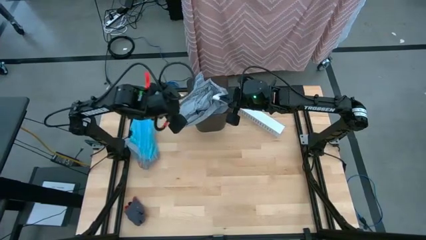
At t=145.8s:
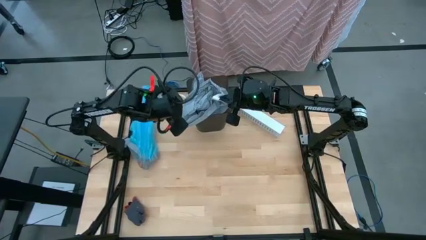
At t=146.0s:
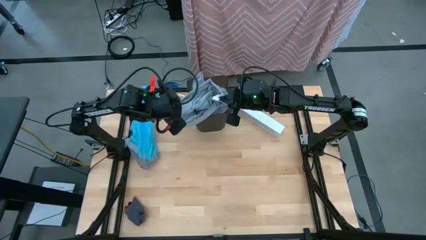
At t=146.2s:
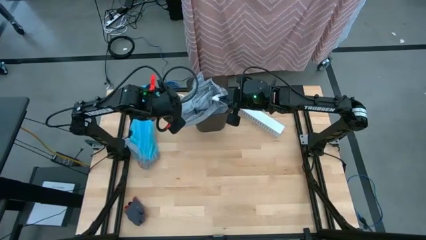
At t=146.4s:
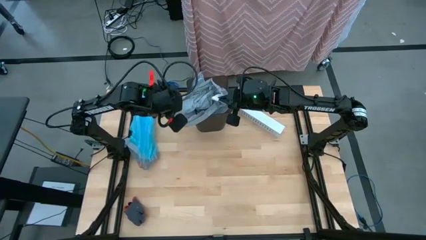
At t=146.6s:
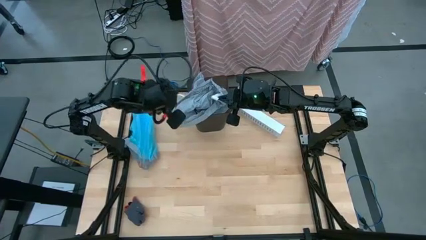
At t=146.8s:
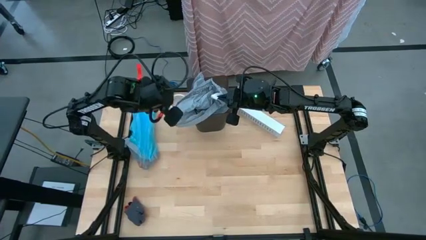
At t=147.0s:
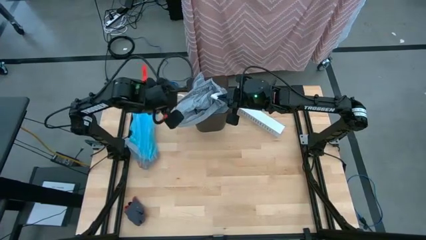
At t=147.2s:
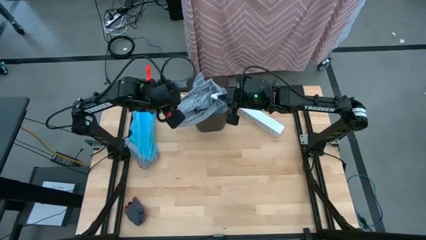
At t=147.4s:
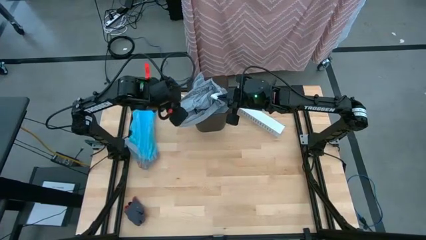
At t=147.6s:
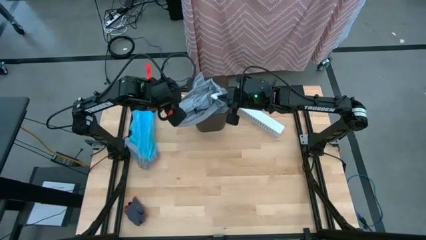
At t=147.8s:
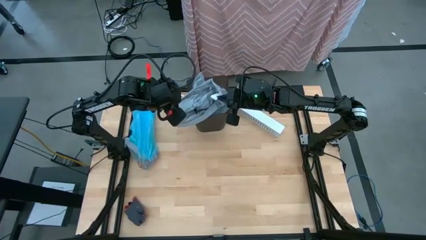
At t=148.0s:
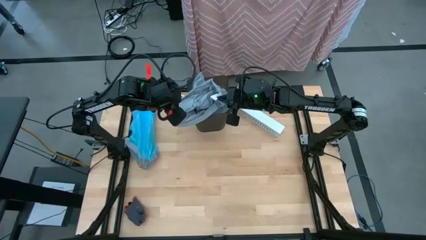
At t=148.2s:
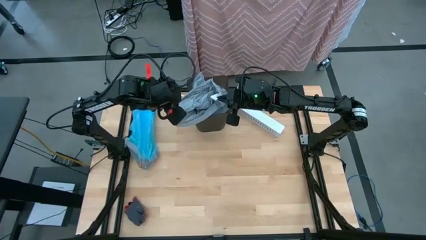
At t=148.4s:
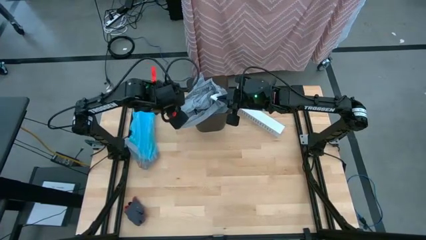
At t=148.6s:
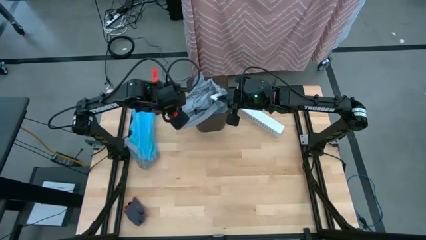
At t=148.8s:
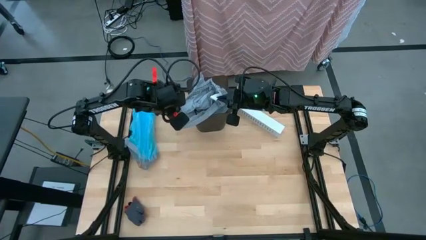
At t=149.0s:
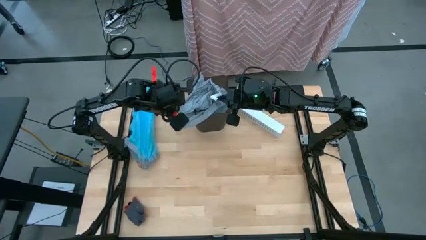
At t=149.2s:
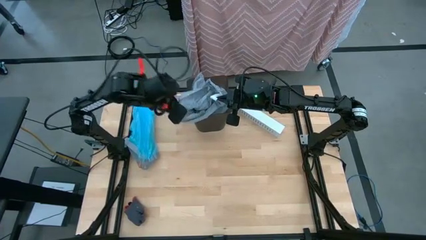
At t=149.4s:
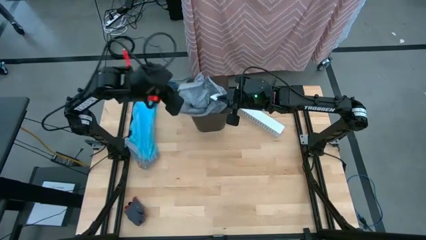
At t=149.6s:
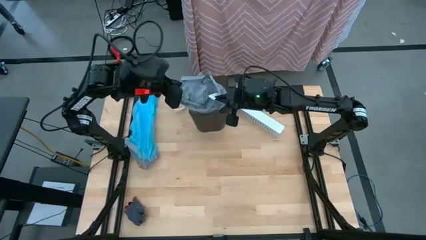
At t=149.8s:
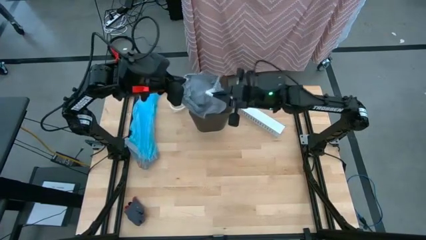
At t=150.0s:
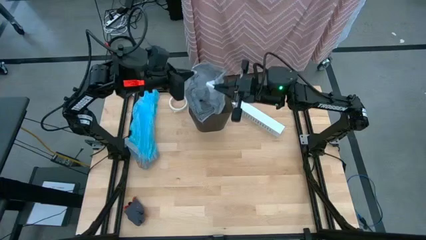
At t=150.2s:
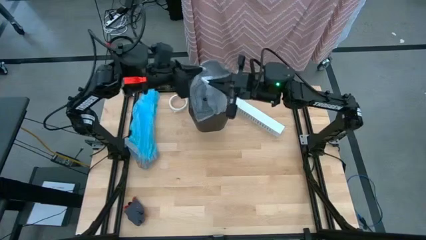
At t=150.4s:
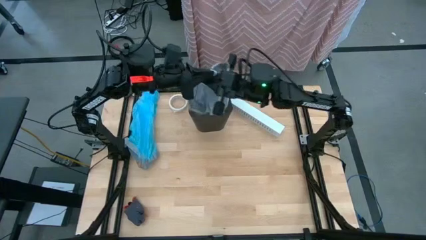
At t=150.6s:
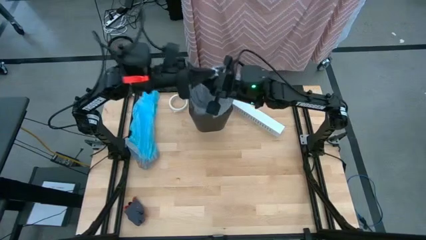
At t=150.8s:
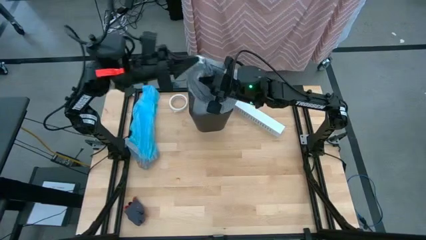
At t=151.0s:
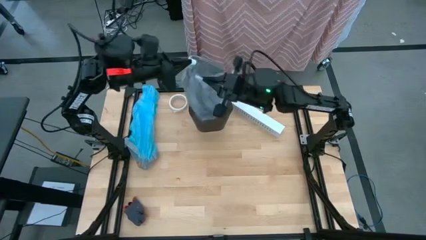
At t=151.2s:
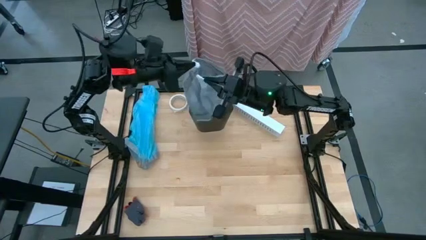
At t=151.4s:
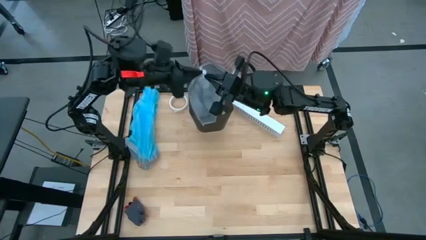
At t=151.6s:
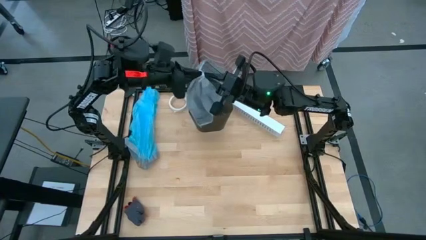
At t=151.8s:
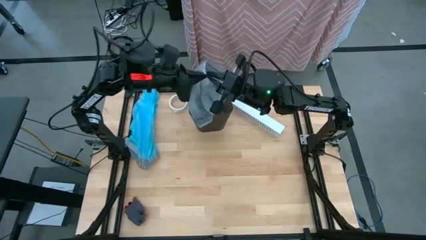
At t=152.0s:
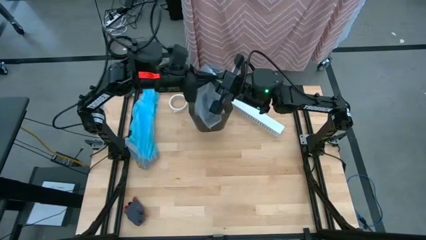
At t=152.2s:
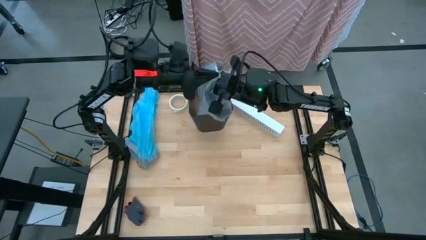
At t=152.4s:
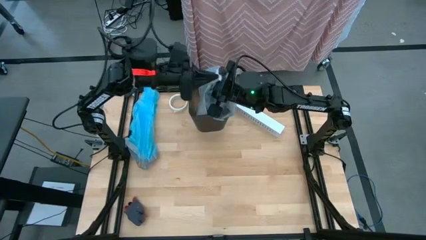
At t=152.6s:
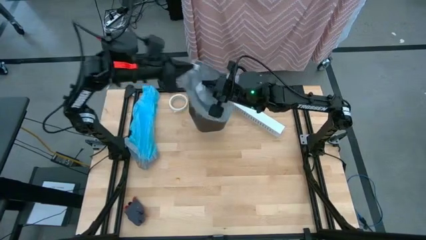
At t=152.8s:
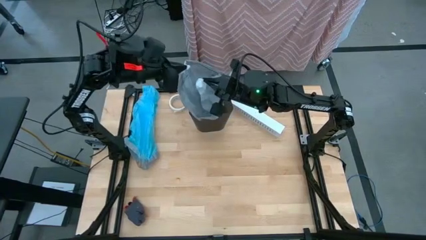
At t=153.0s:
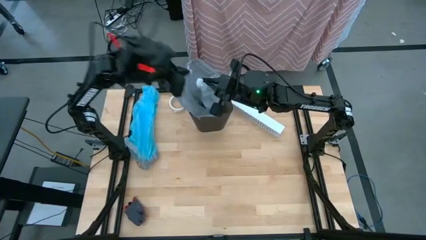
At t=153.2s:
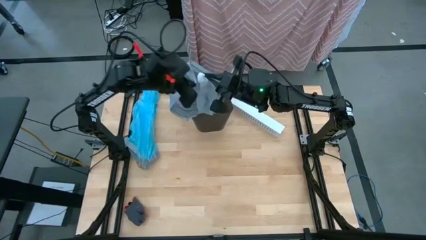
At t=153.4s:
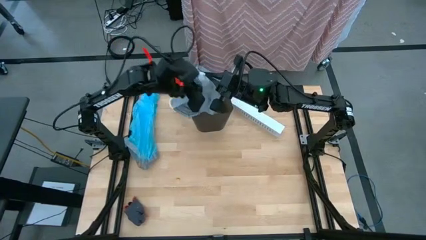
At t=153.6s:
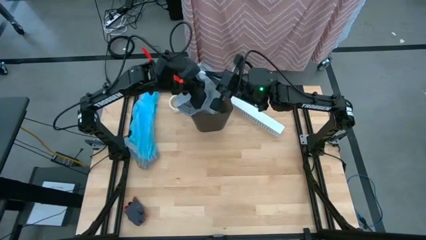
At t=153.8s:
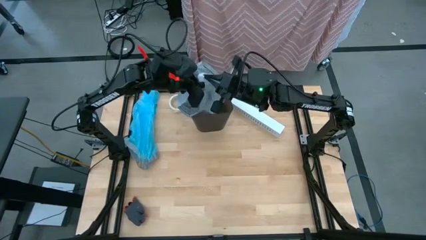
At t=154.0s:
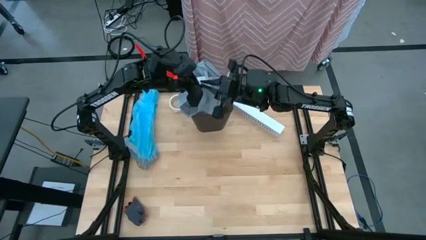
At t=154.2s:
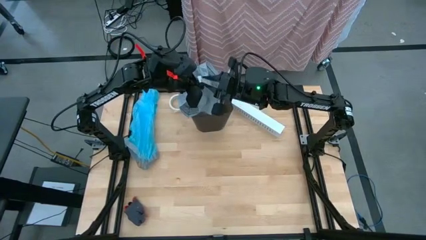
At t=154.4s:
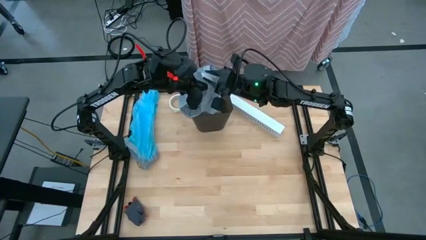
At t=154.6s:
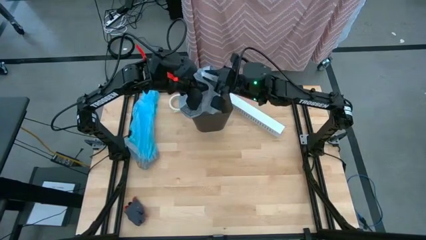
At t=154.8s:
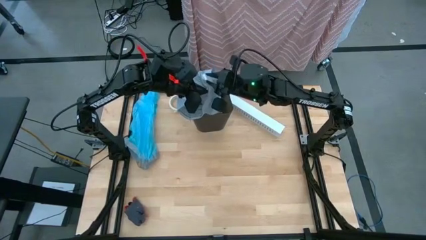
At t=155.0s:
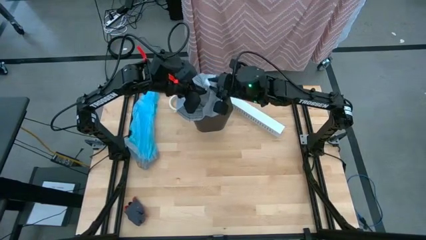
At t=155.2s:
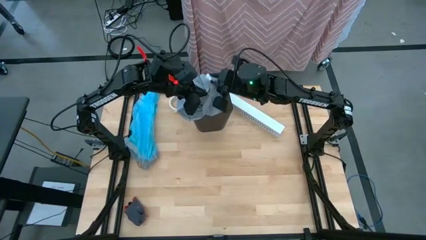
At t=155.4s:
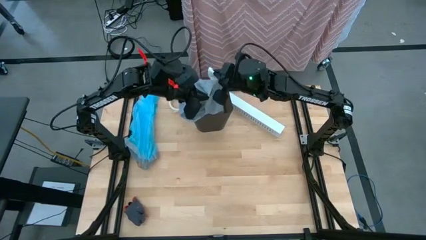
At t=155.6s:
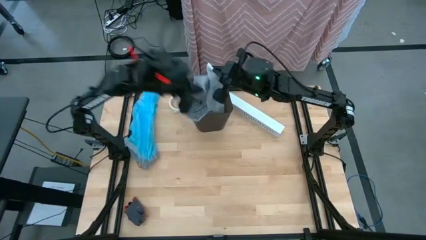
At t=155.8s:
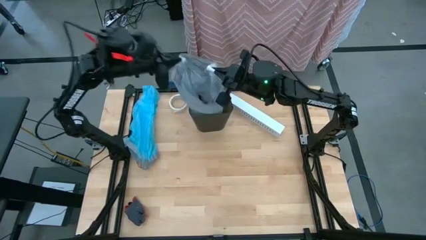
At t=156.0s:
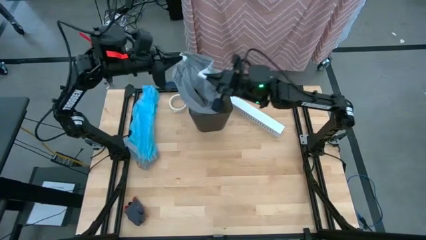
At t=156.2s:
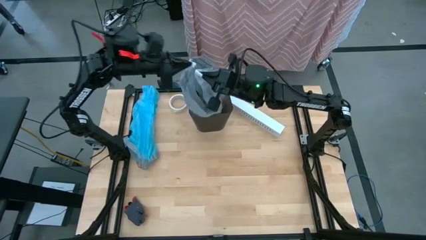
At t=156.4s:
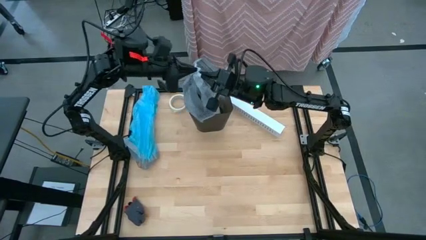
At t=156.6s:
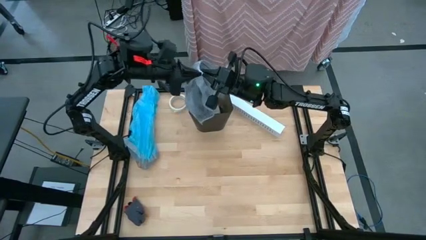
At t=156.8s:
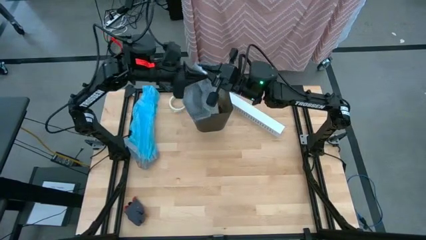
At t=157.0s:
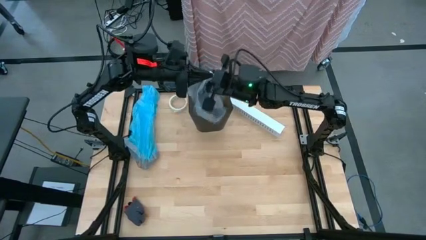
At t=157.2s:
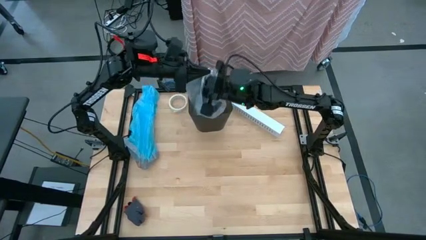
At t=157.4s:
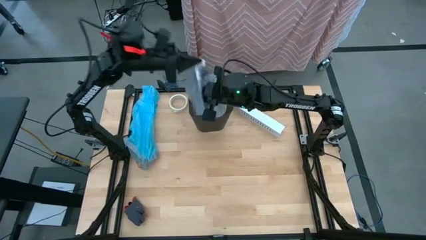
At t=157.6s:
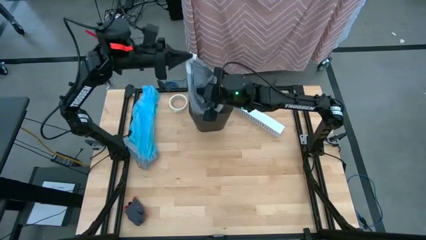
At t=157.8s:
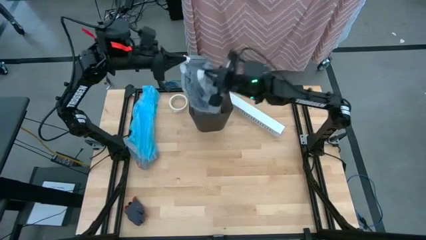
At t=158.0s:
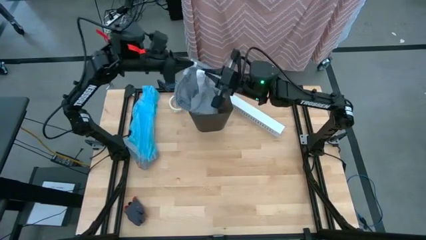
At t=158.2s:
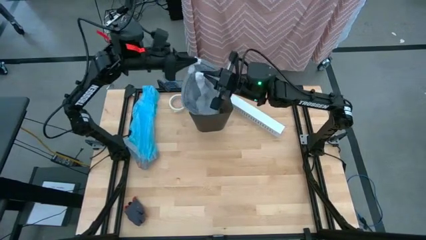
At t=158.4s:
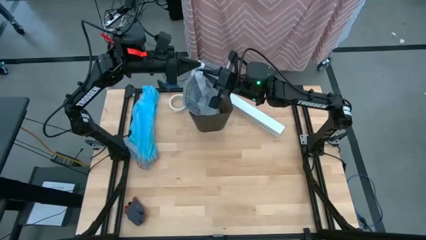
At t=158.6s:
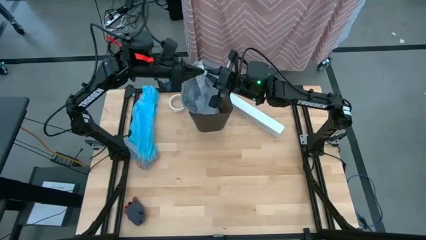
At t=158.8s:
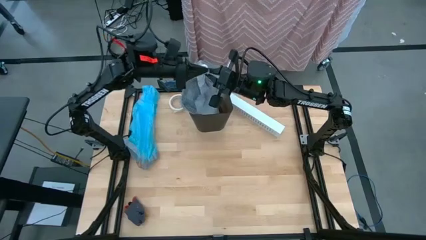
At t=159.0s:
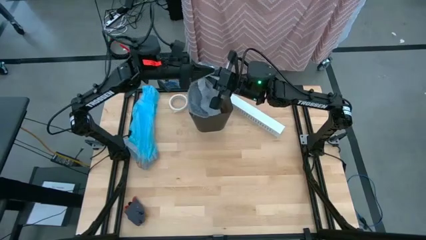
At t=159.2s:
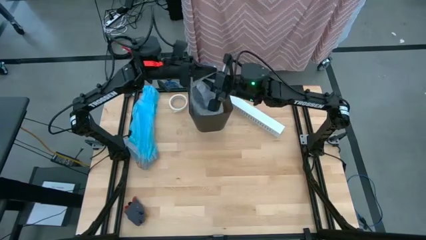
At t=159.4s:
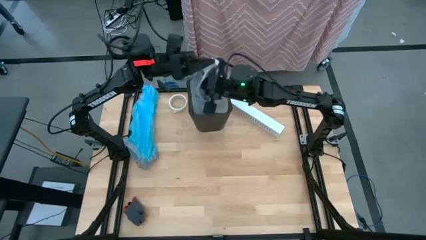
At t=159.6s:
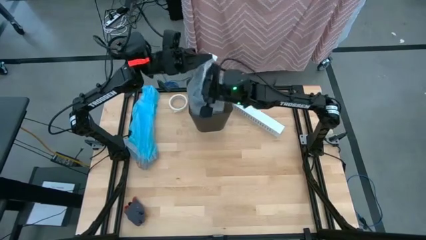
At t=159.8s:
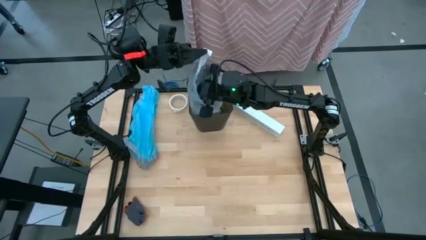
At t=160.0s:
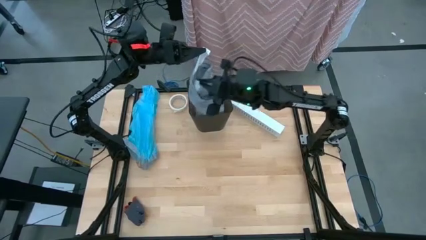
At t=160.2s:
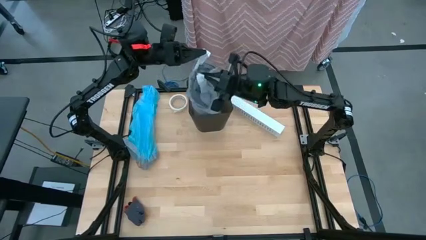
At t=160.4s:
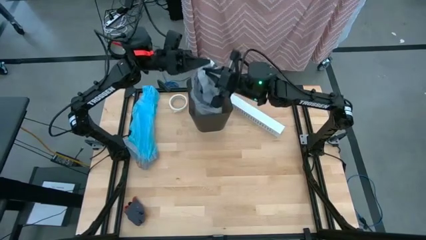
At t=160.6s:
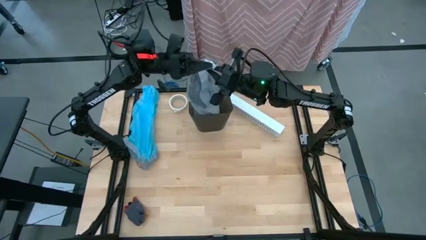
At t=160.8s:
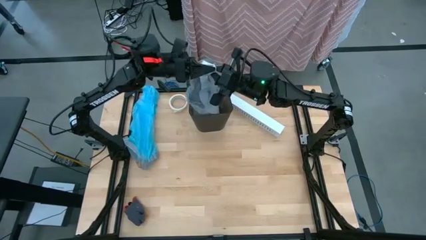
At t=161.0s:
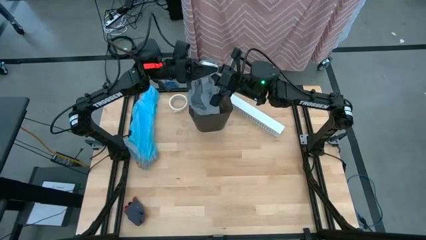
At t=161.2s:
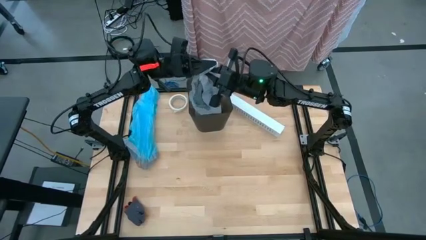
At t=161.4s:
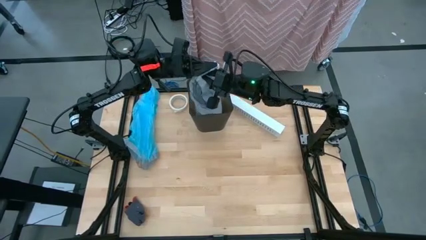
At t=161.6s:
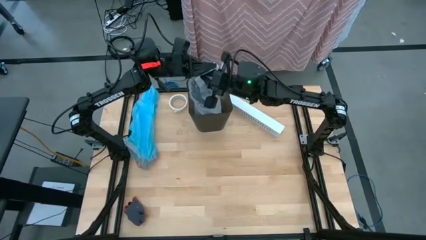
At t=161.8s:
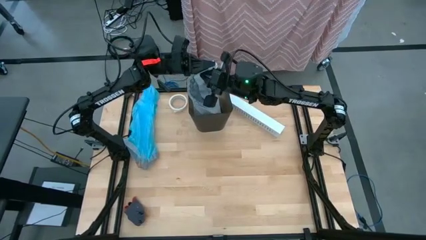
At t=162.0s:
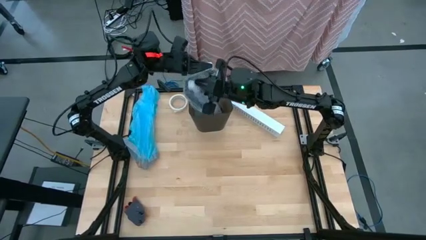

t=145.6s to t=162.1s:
Task: place trash/remove bag and relplace
Remove the trash bag from the trash bin
